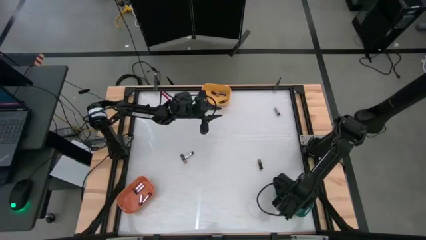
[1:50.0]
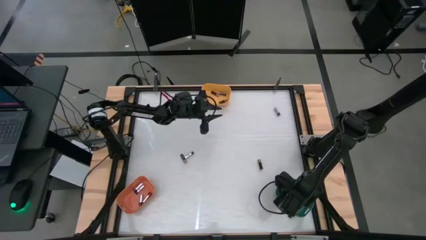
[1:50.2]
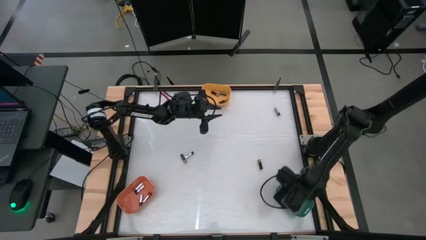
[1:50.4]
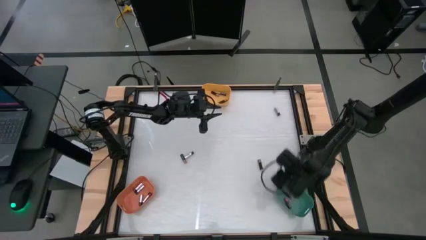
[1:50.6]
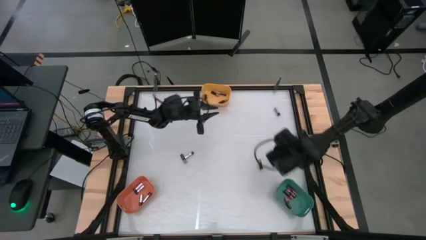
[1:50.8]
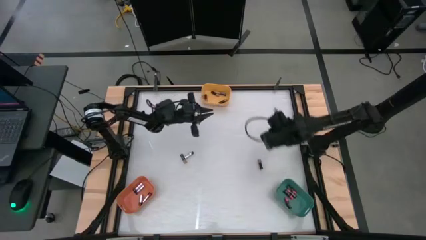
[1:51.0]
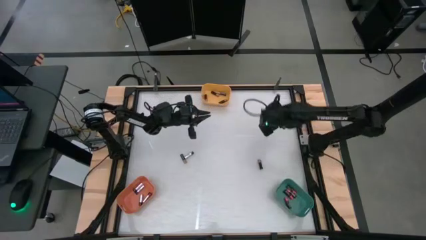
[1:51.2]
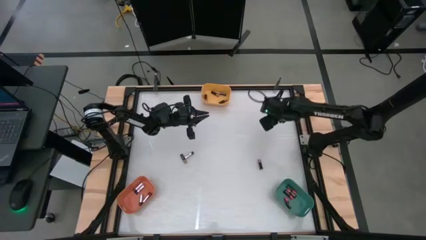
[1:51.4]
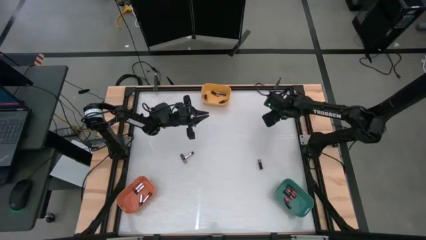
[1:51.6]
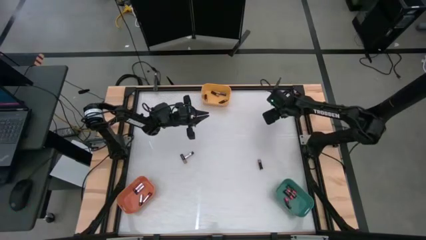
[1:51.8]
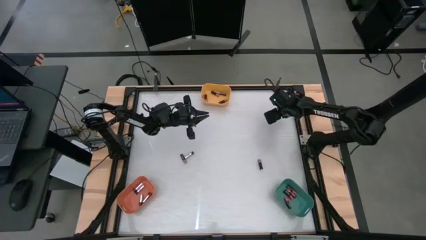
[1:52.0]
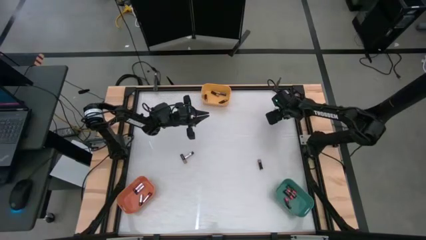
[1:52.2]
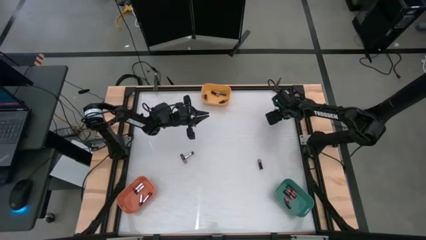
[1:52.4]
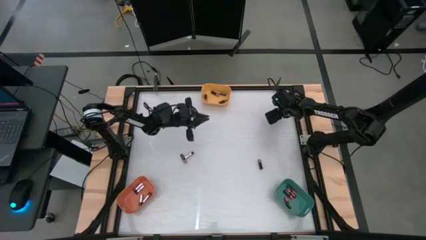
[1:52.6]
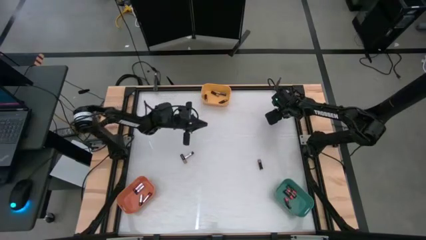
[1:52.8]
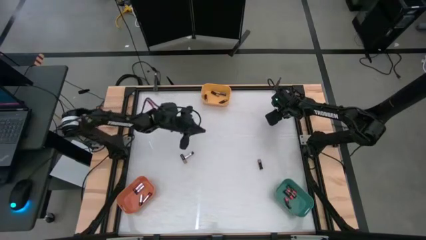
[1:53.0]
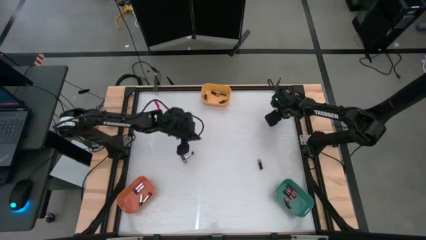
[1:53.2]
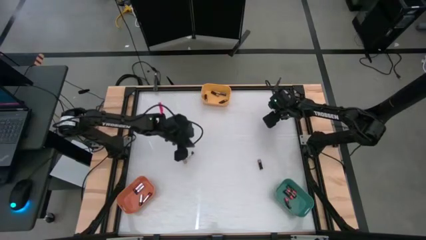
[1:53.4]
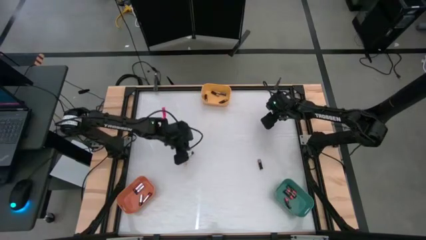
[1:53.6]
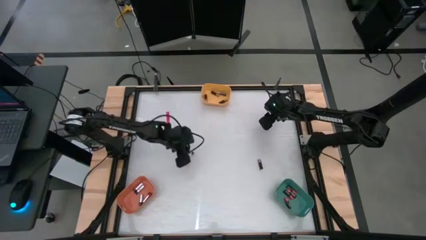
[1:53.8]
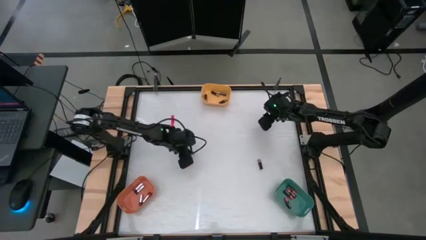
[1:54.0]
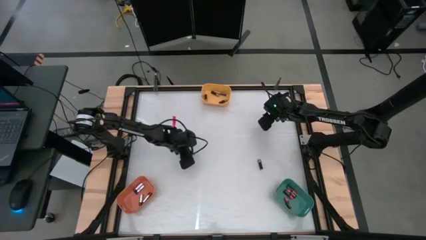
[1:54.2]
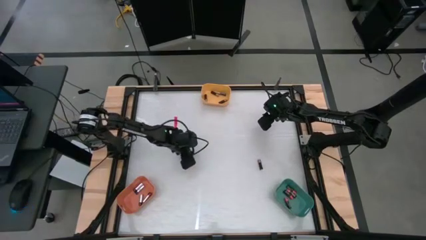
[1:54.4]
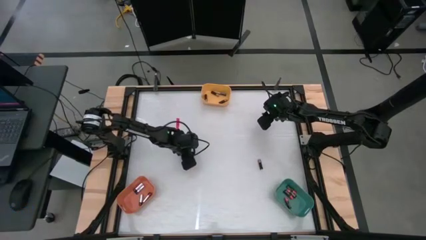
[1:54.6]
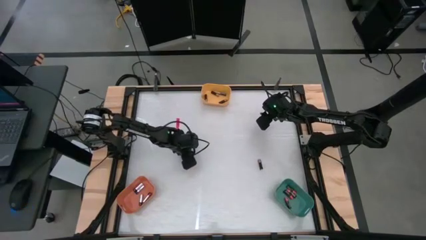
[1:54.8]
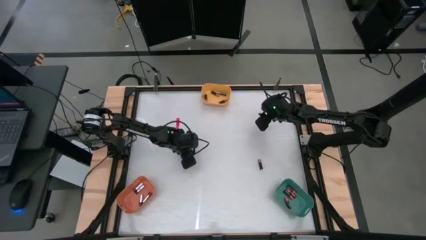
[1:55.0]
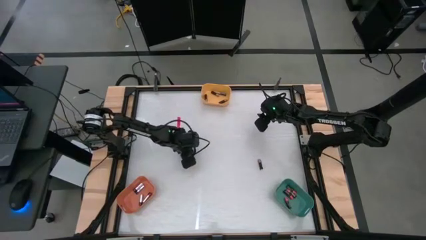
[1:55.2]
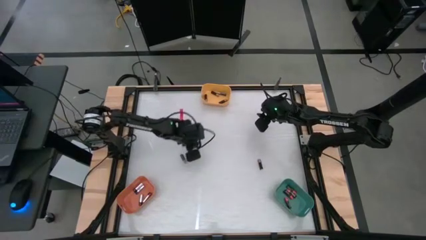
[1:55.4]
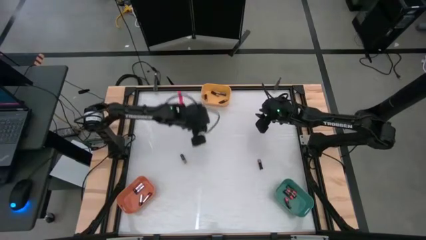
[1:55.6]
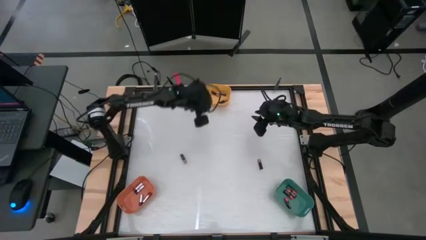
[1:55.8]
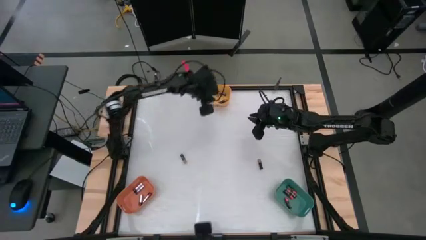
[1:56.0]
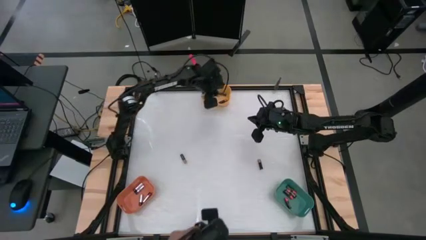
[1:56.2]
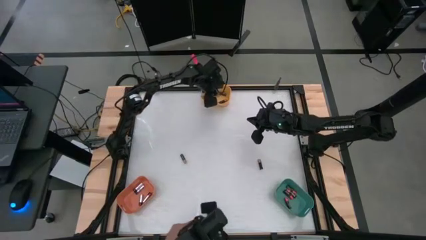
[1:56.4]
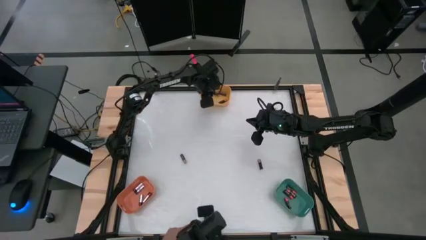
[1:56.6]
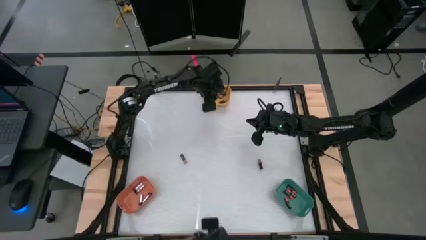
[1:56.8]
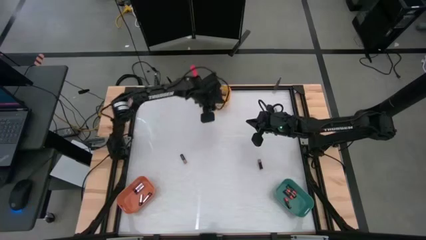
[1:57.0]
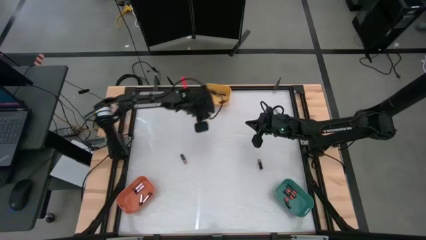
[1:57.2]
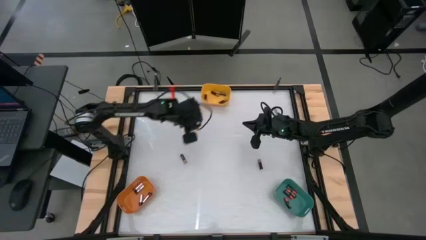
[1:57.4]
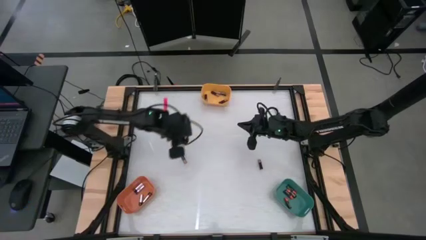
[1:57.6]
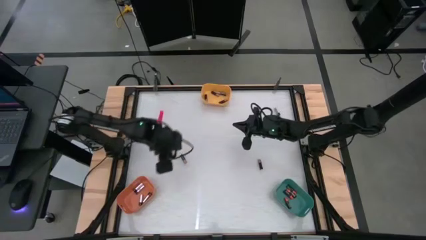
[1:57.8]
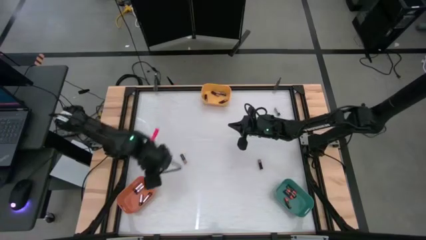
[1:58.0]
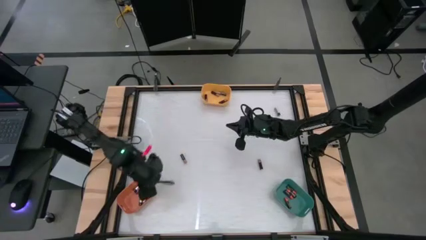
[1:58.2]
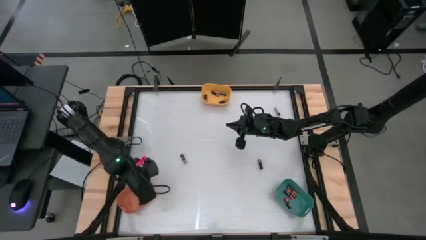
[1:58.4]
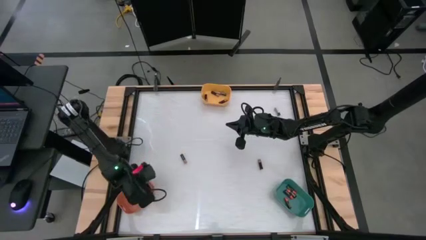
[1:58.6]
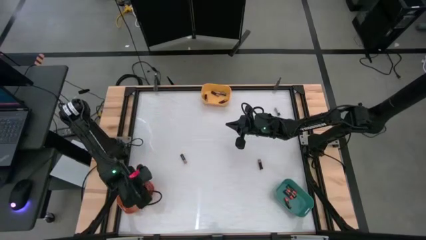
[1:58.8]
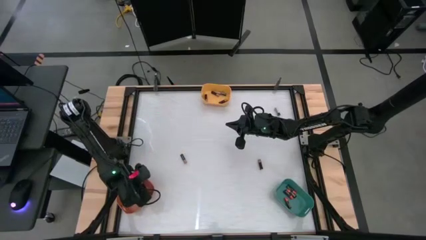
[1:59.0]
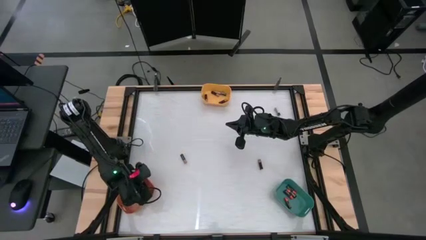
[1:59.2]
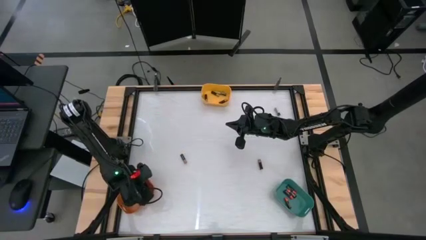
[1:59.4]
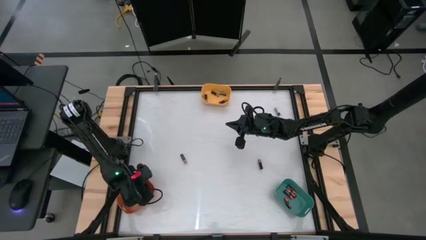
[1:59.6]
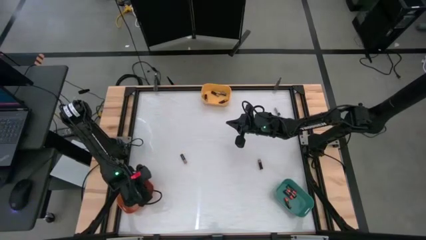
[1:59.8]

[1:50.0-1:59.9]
Task: Sort batteries
Put the silver battery into the orange bin

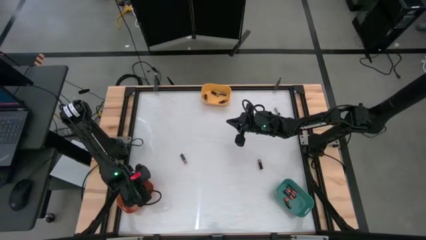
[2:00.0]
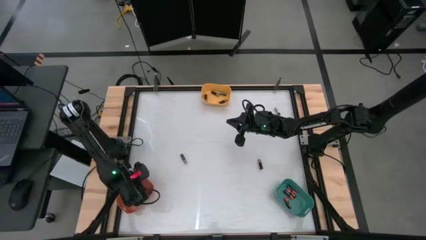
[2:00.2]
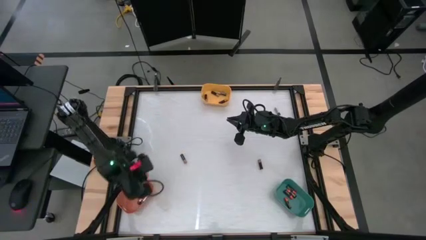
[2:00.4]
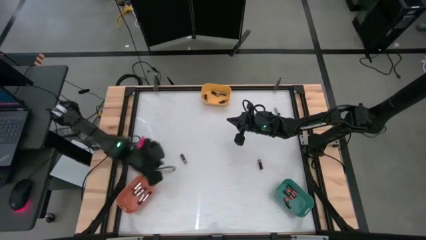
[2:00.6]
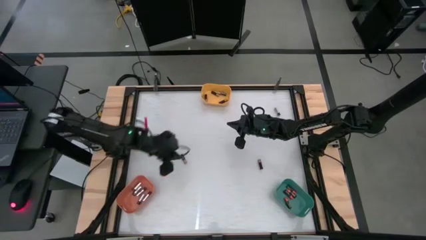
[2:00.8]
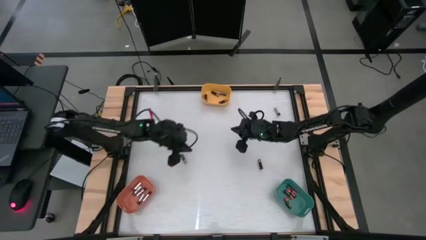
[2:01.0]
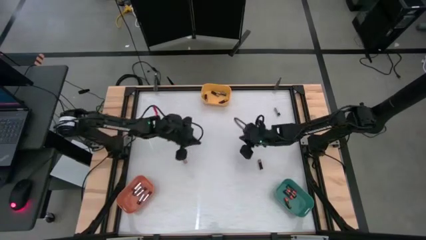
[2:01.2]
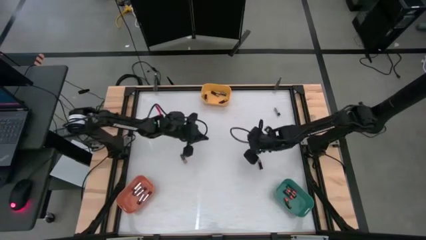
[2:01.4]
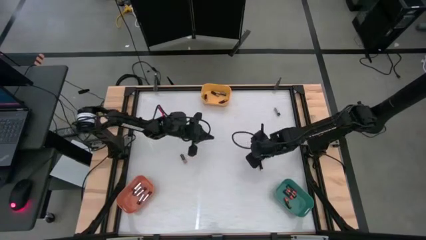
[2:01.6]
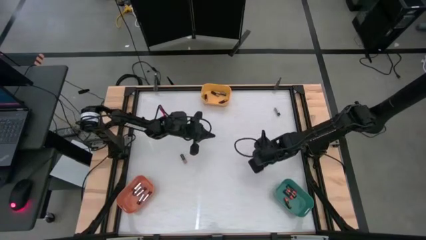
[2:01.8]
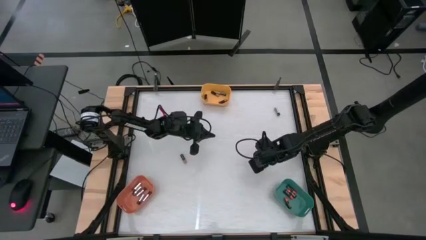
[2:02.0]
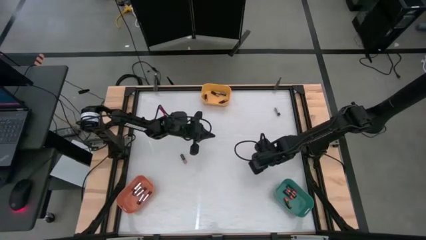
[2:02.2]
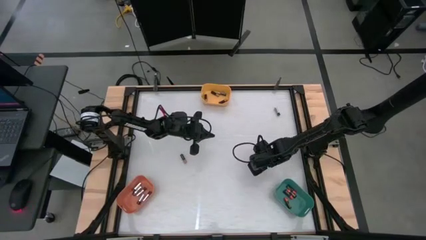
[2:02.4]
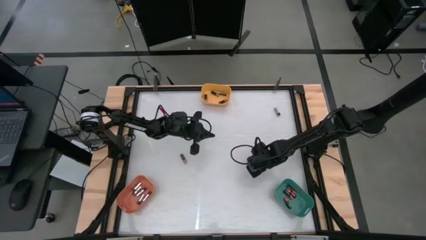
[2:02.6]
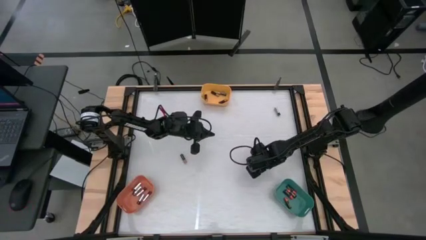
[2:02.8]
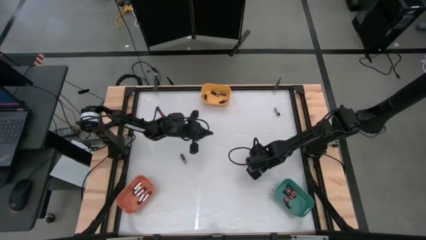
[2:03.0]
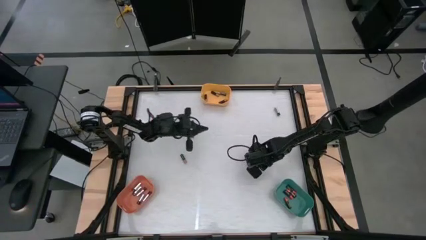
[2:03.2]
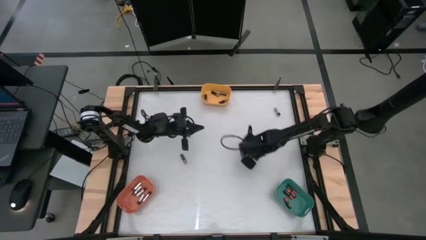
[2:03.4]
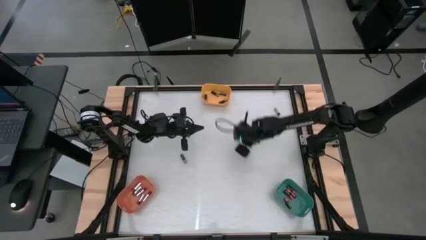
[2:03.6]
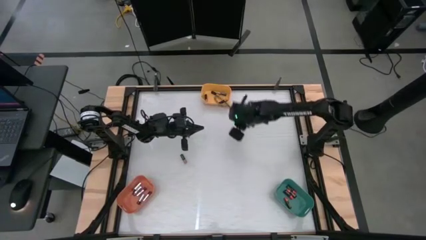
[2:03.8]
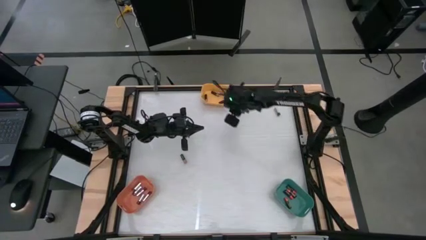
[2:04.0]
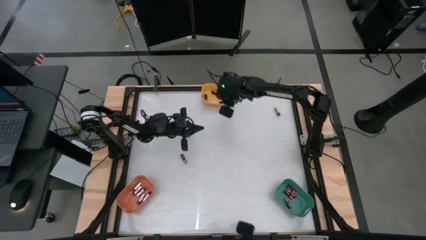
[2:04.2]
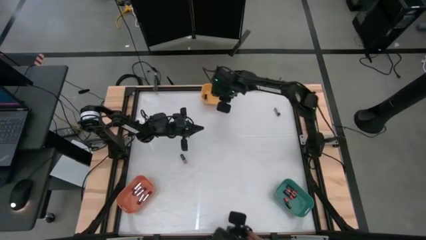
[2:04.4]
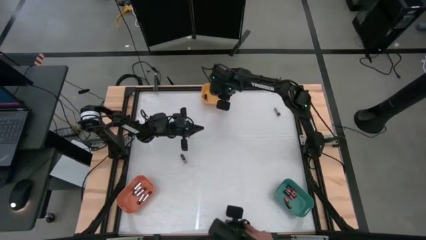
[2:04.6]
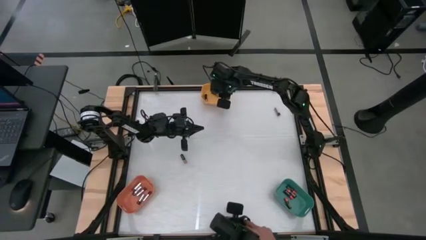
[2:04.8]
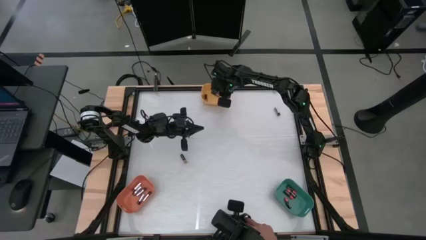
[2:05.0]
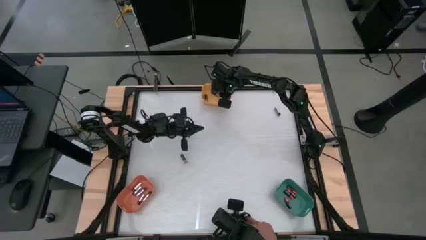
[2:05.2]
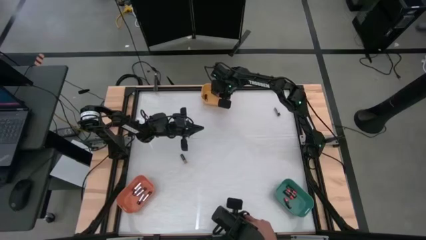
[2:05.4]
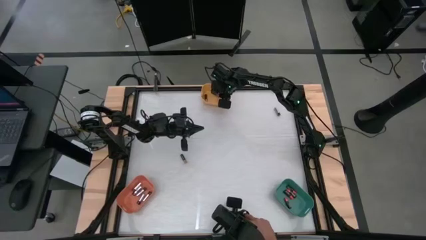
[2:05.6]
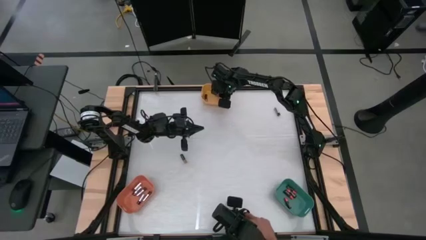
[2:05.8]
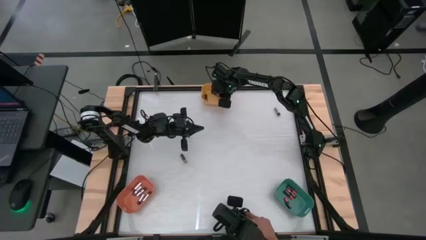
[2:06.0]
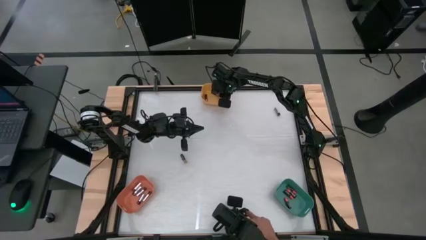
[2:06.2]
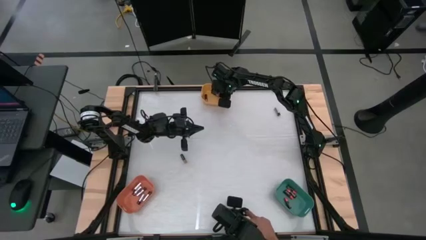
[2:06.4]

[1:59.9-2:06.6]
Put the black-brown battery into the yellow bin
